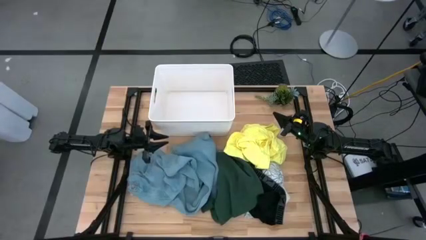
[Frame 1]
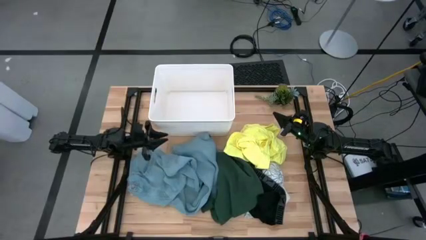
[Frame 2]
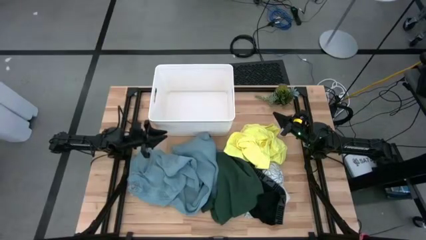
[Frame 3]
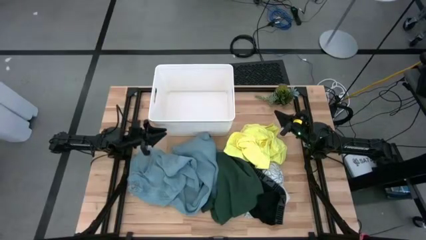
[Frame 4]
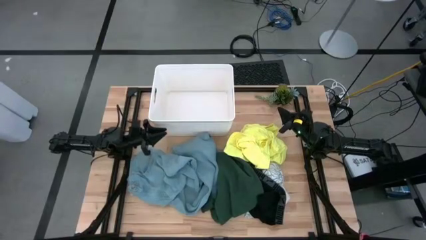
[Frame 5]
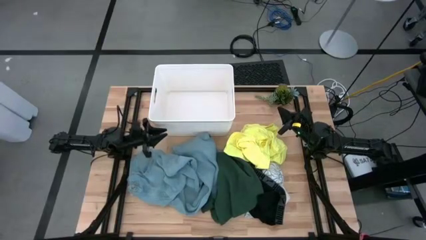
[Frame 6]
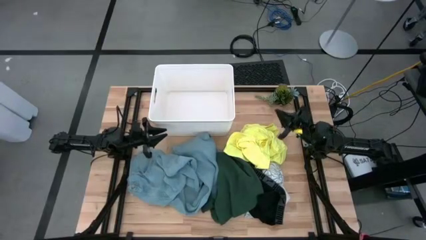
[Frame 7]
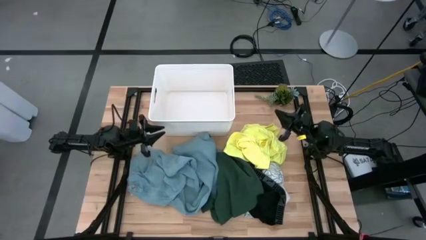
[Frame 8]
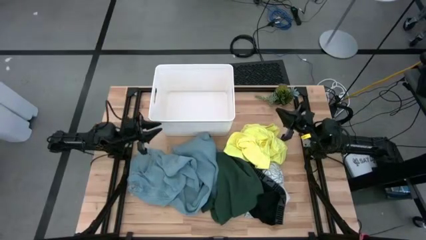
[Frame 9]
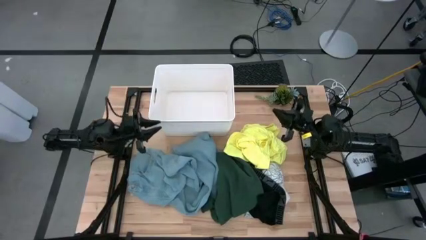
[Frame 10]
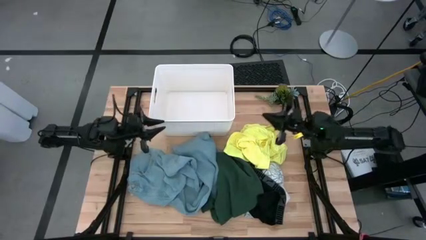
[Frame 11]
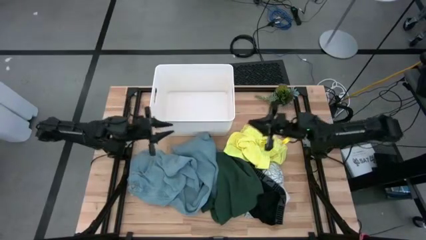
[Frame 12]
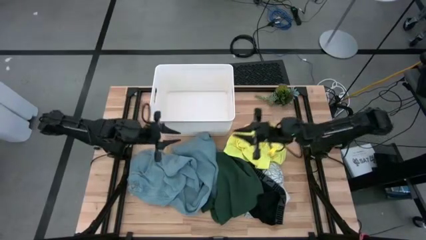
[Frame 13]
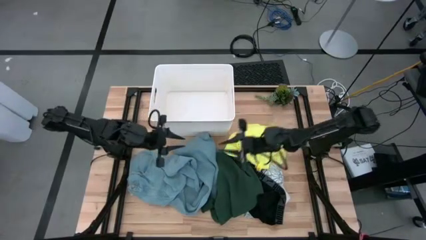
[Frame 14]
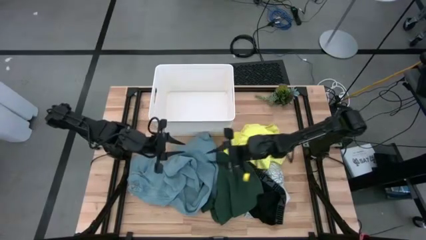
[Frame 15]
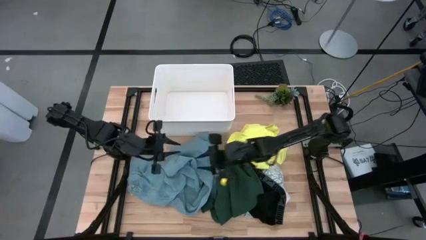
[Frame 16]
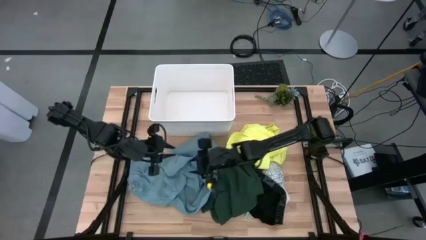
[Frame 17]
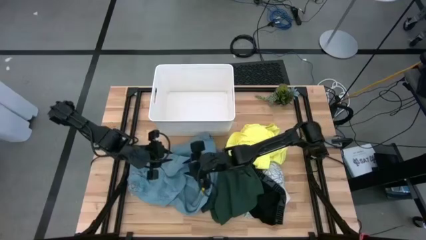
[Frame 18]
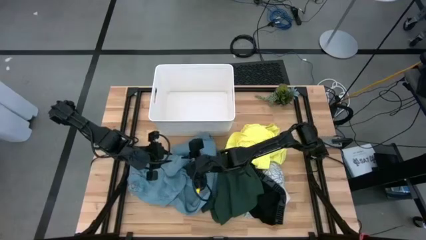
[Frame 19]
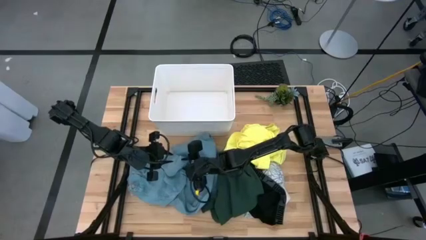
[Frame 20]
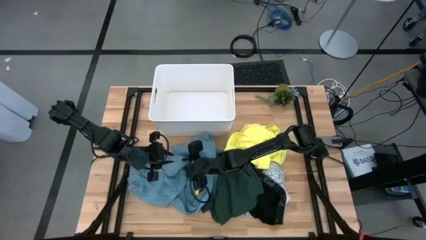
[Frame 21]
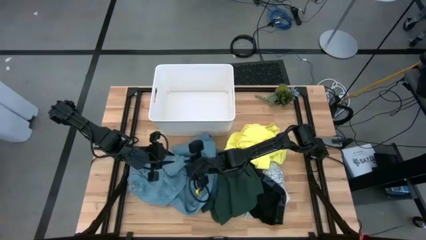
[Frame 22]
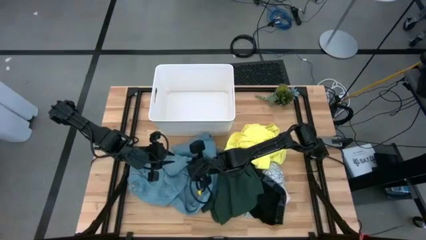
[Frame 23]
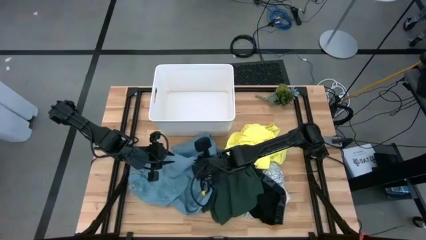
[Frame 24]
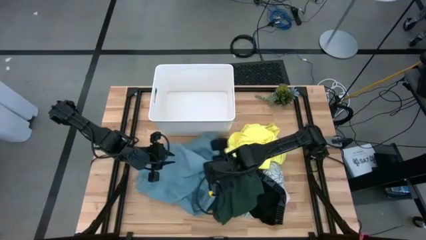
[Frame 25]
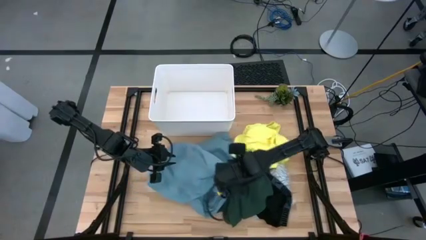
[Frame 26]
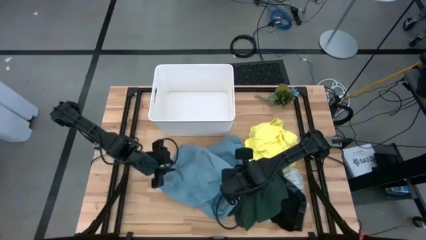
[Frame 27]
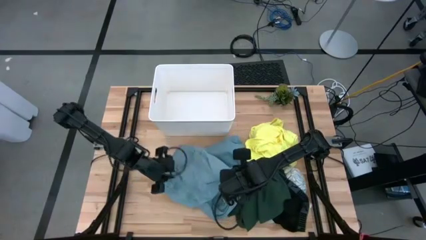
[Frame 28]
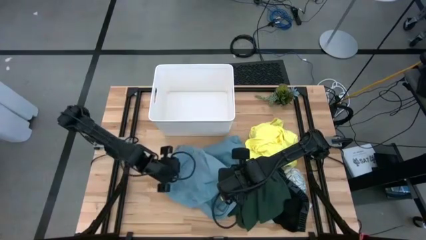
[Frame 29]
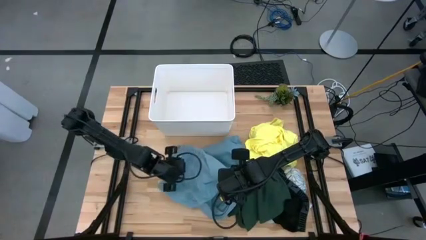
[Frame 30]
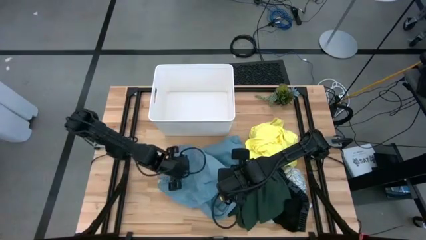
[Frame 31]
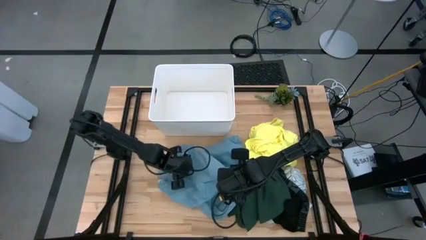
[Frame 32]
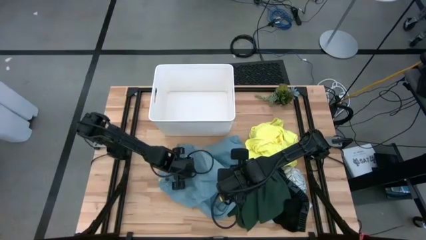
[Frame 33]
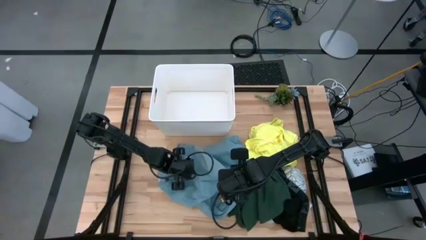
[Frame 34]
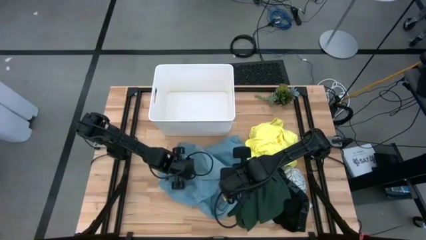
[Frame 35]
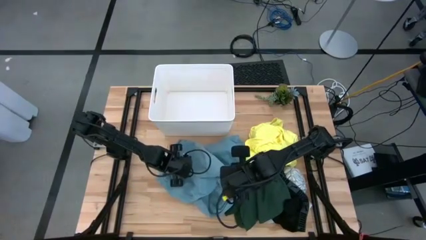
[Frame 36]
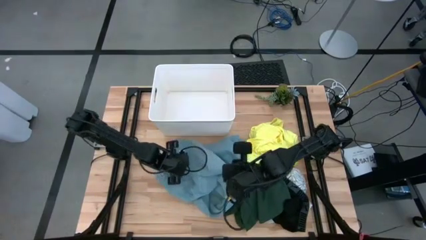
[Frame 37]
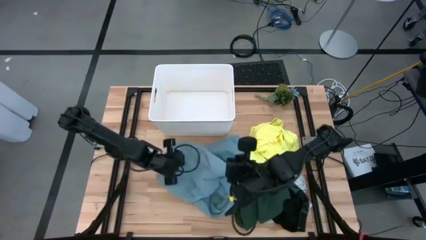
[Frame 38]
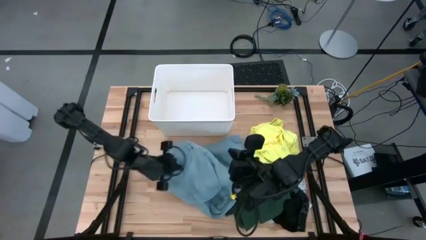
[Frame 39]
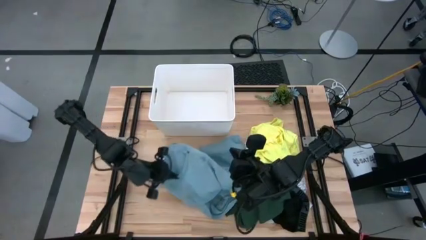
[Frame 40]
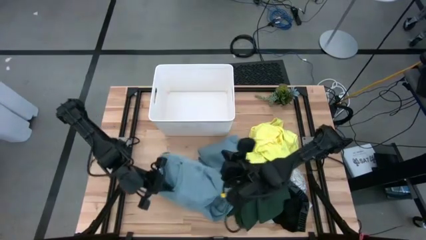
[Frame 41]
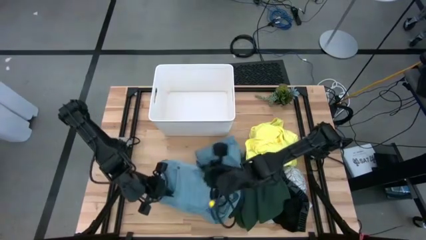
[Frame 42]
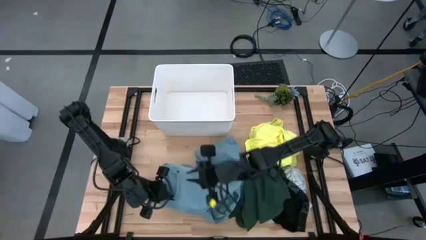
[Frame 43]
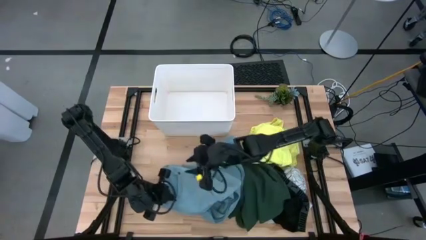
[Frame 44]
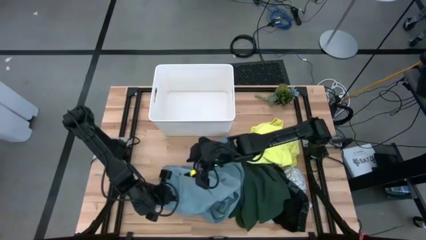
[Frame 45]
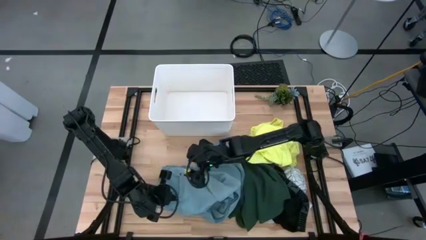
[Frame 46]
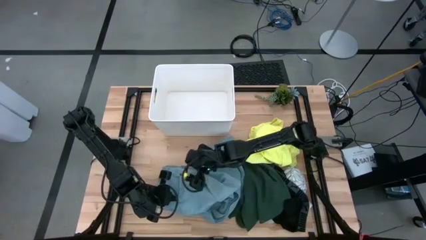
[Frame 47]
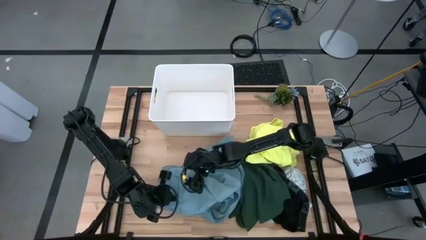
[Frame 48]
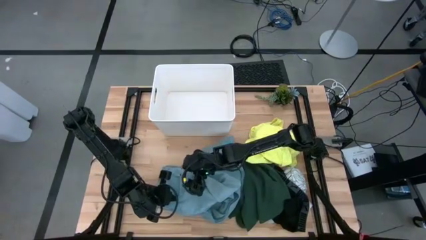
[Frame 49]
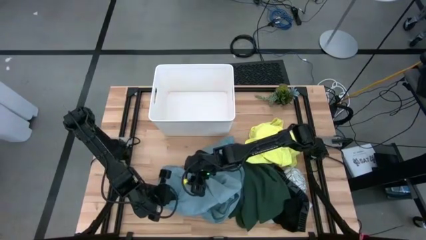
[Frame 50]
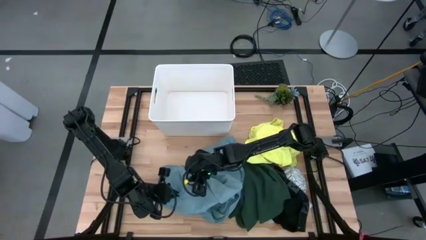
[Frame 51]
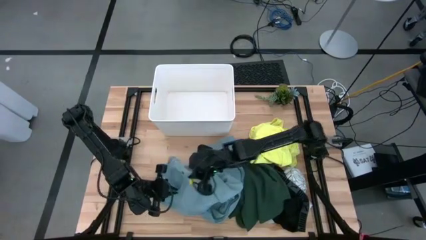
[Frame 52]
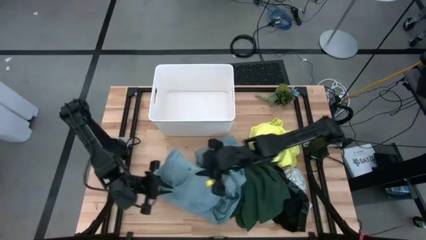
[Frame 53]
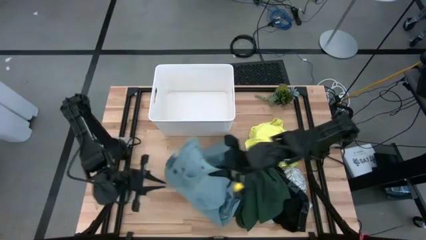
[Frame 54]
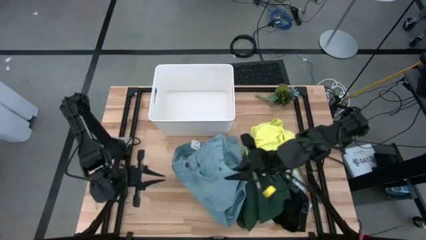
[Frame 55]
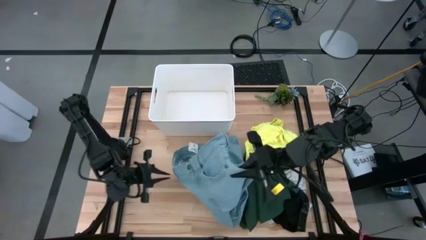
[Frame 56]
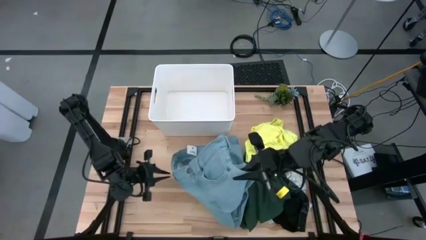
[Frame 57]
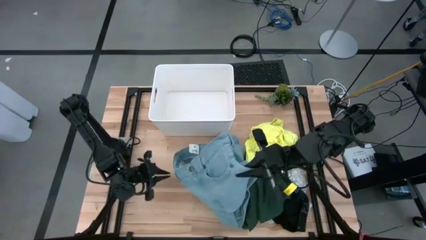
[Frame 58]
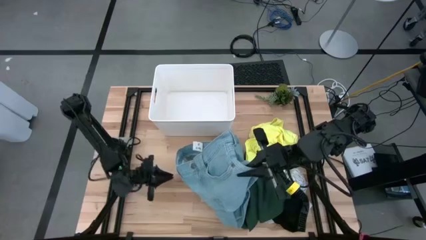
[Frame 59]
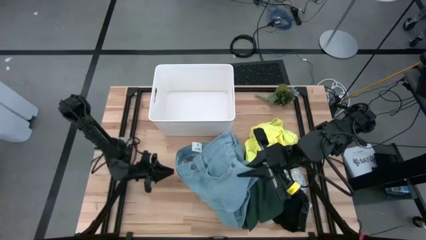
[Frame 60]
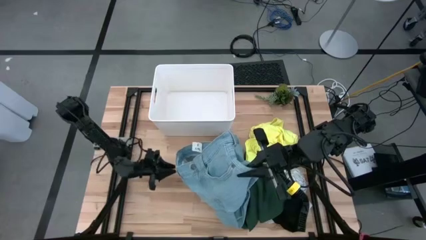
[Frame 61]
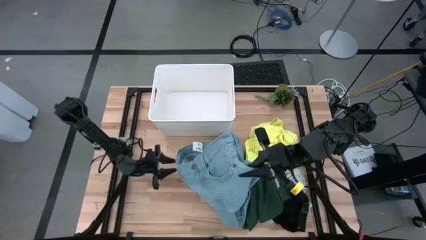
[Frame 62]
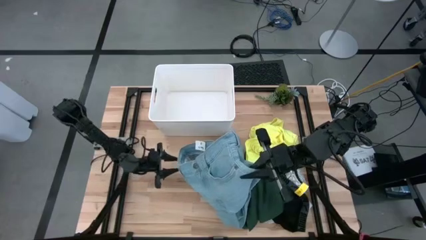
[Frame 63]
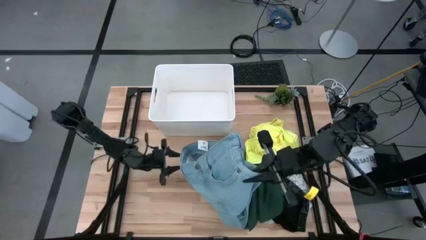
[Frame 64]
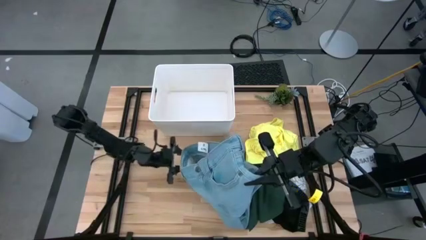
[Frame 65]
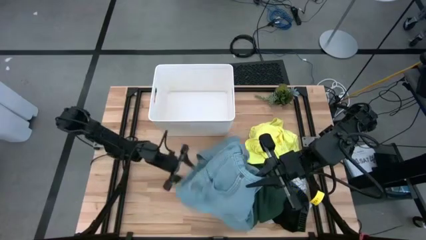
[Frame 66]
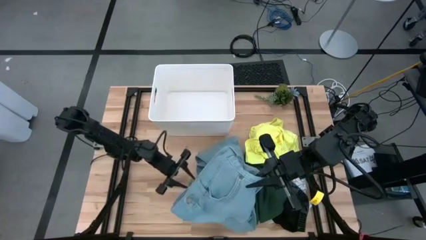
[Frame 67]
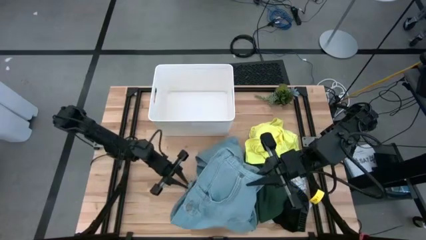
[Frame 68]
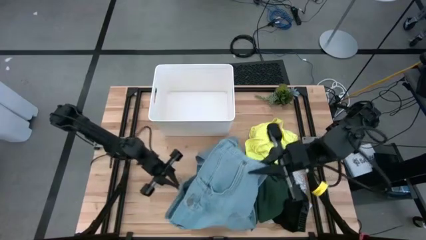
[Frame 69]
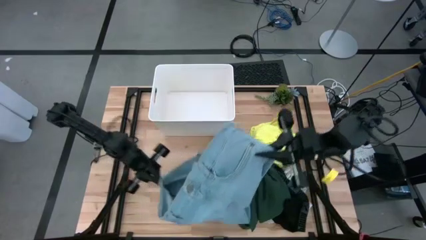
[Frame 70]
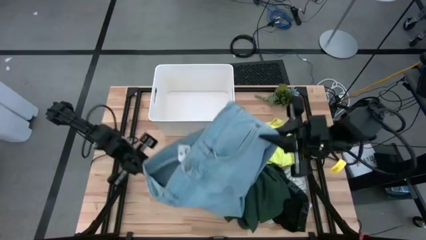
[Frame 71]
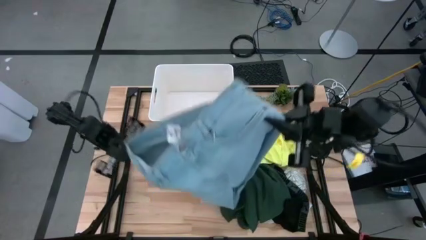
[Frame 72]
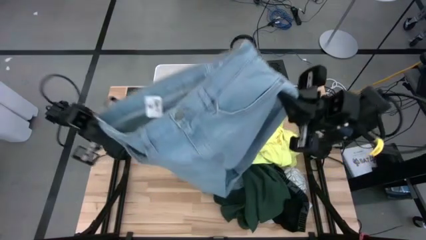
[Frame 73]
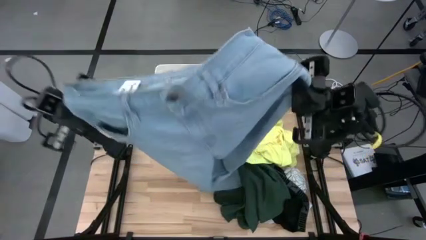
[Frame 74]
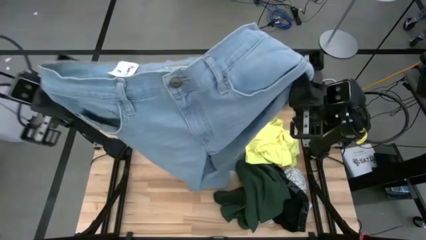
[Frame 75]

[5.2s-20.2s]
Task: Fold laundry
Fold the blue pants

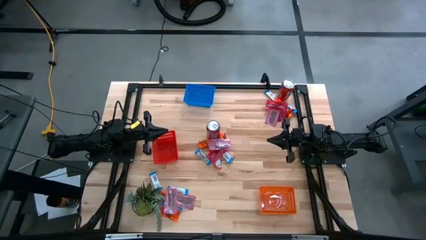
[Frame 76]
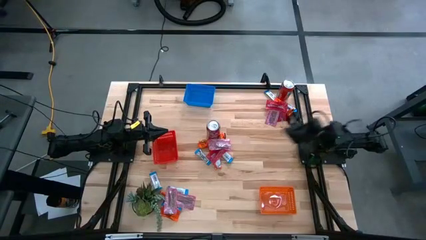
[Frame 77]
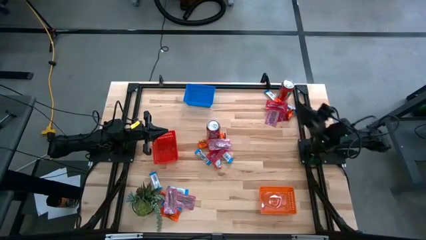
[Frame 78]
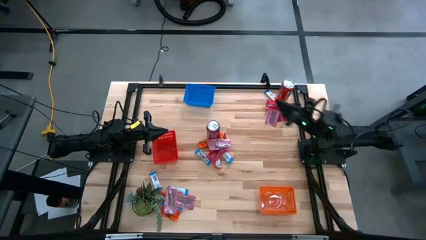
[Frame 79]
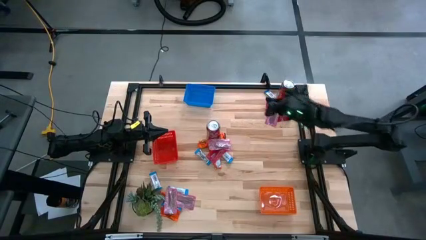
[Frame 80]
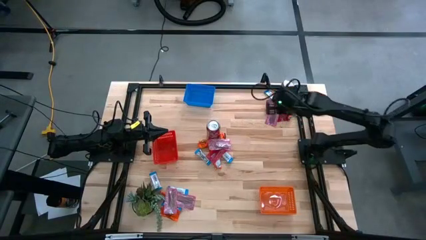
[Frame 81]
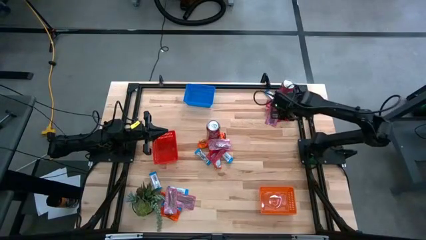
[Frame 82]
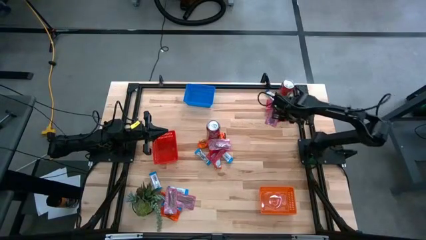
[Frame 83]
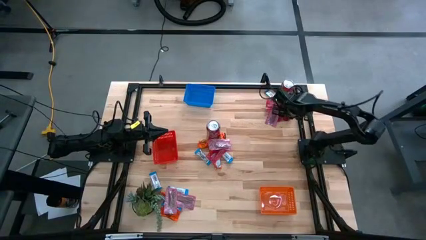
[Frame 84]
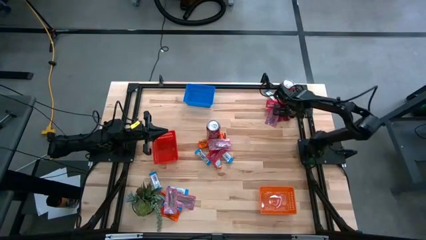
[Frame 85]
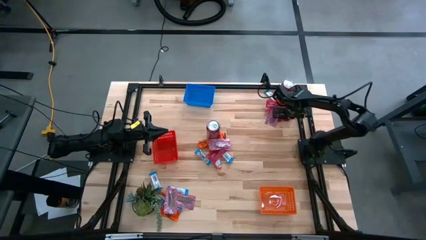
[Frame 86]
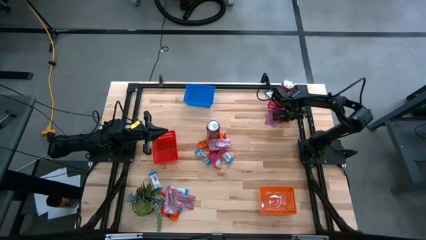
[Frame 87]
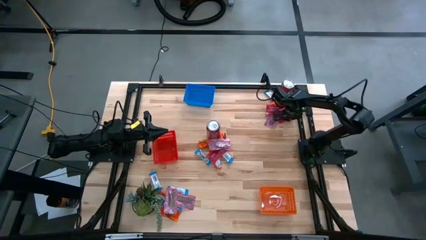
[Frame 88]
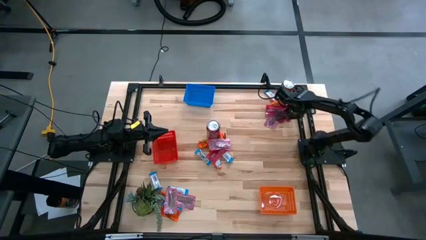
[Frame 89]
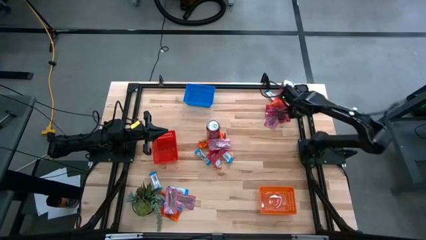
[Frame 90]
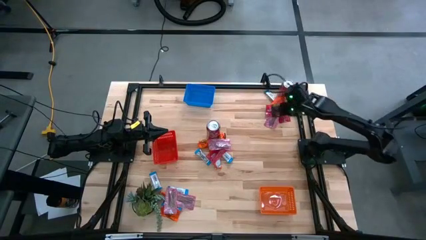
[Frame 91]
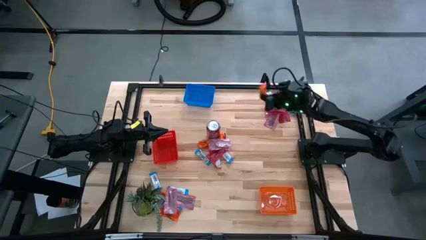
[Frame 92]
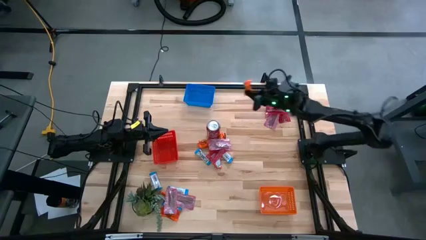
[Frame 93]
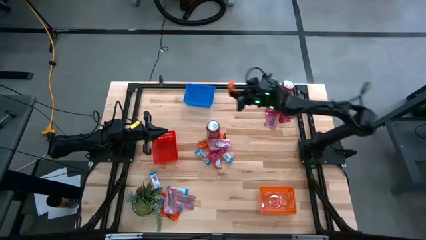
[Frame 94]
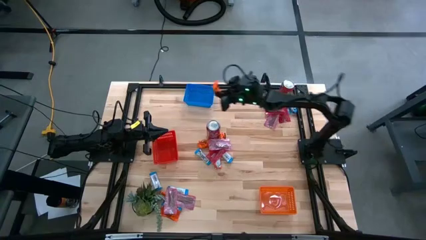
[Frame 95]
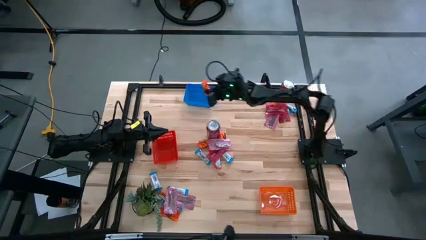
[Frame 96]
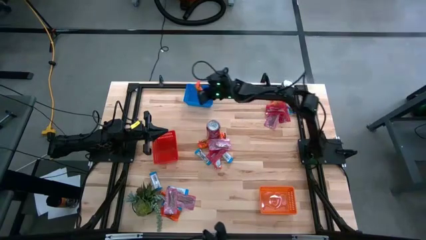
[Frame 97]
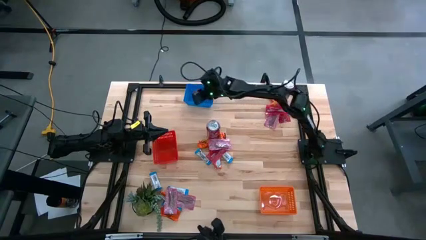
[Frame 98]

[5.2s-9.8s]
Task: Sort candy
Put the orange chocolate into the blue bin
